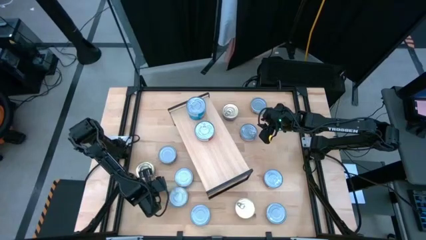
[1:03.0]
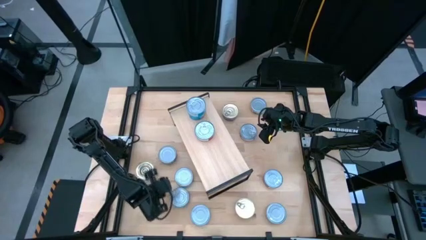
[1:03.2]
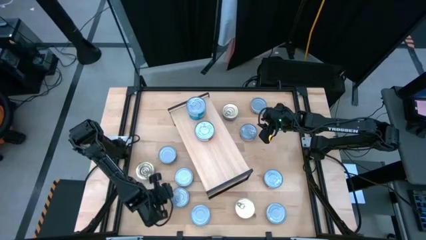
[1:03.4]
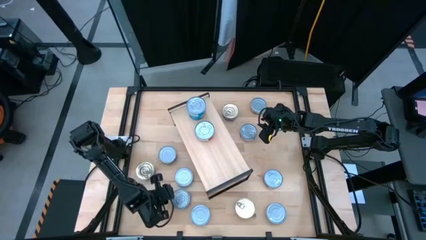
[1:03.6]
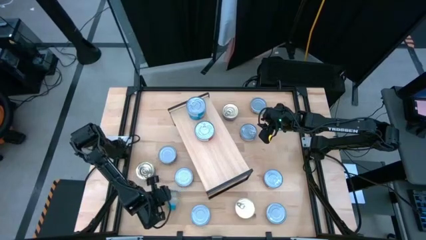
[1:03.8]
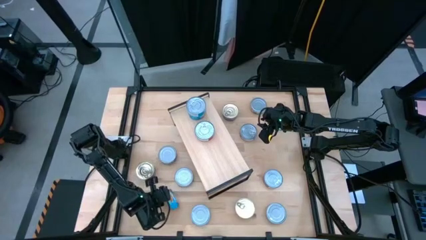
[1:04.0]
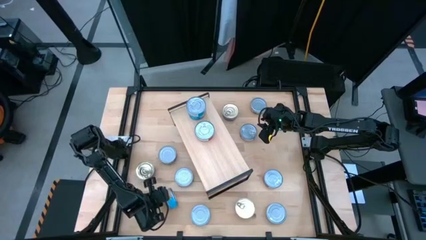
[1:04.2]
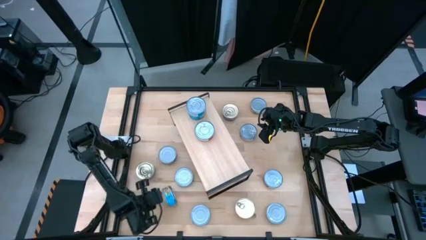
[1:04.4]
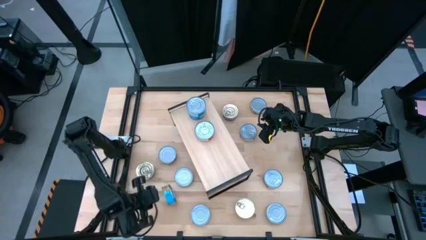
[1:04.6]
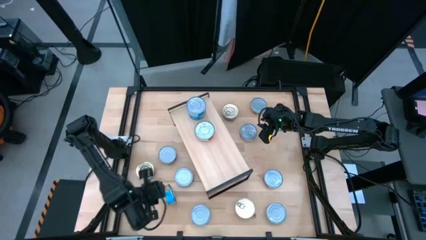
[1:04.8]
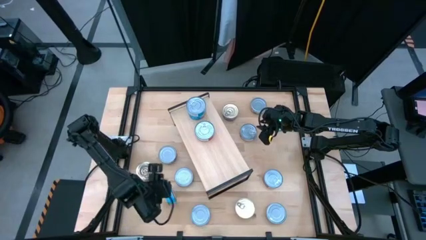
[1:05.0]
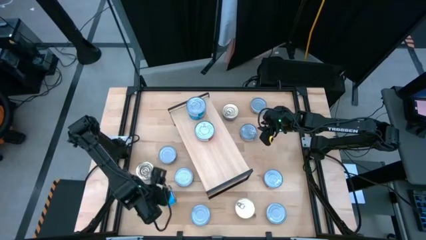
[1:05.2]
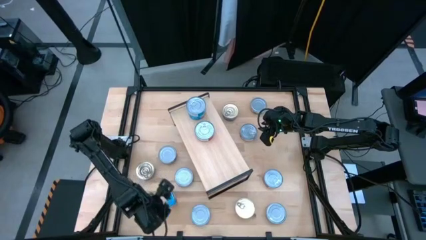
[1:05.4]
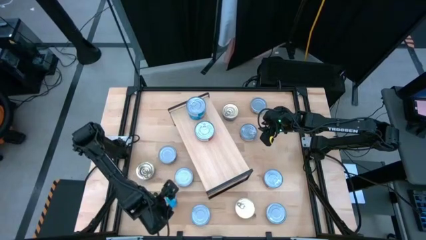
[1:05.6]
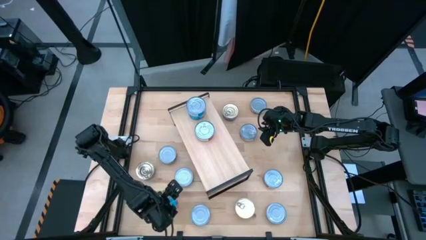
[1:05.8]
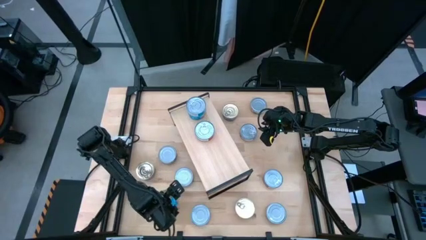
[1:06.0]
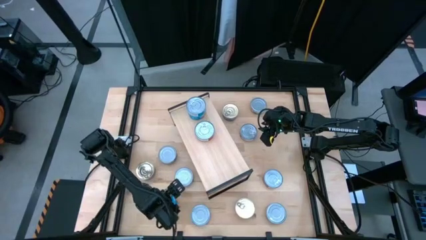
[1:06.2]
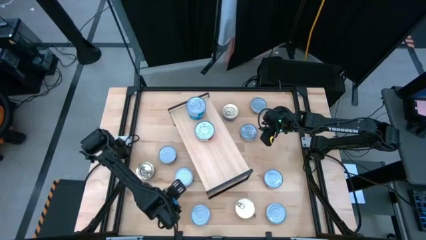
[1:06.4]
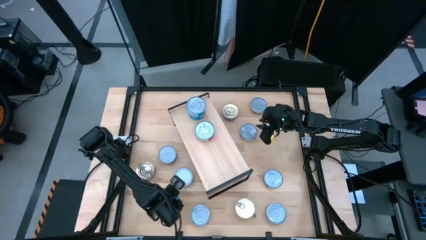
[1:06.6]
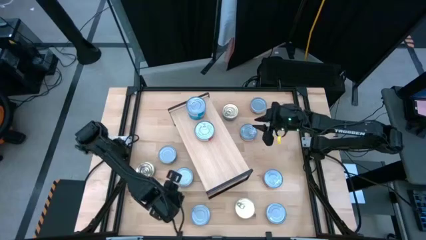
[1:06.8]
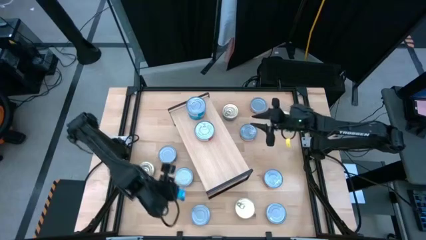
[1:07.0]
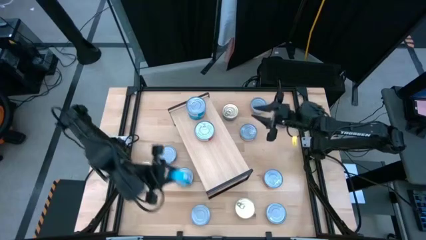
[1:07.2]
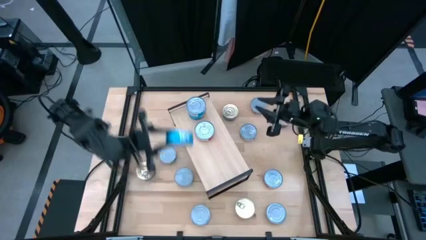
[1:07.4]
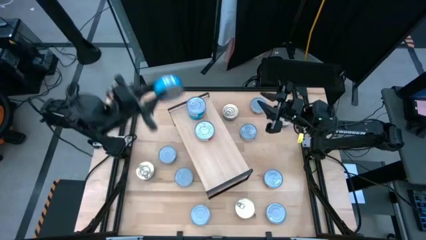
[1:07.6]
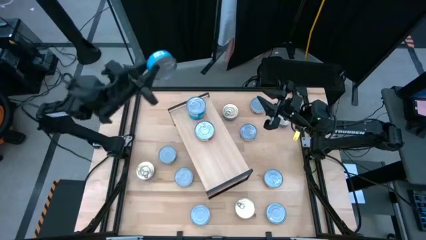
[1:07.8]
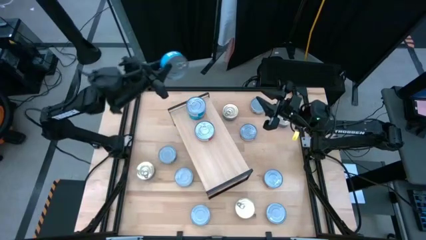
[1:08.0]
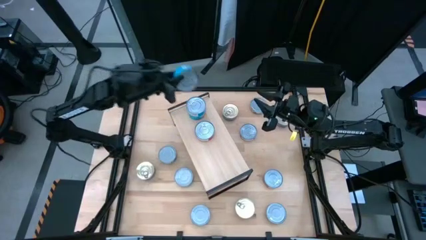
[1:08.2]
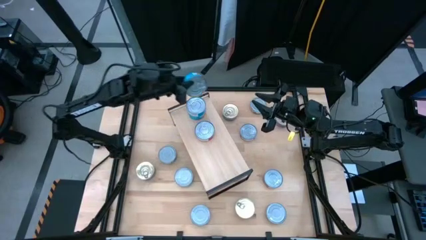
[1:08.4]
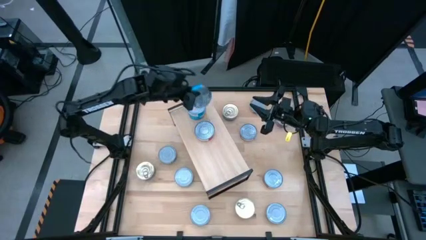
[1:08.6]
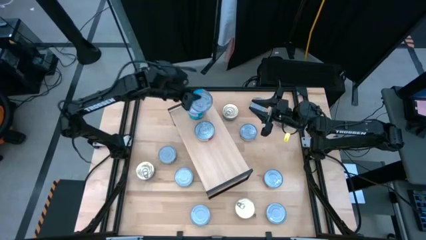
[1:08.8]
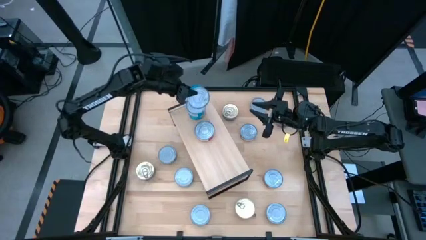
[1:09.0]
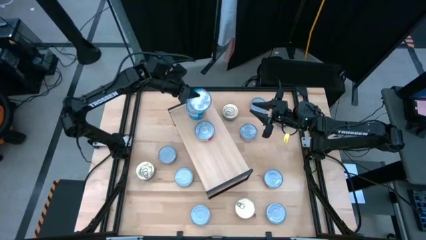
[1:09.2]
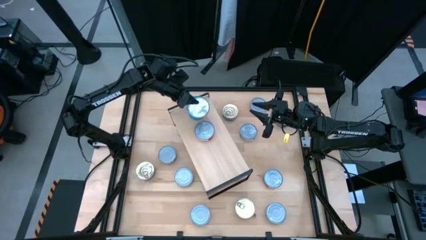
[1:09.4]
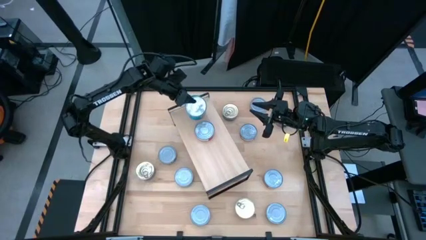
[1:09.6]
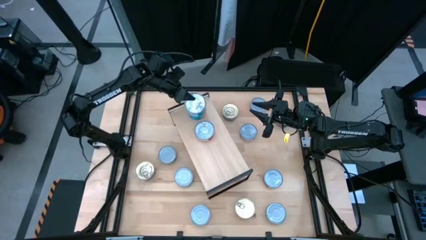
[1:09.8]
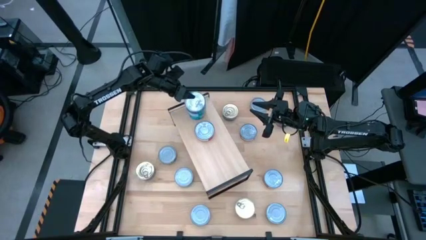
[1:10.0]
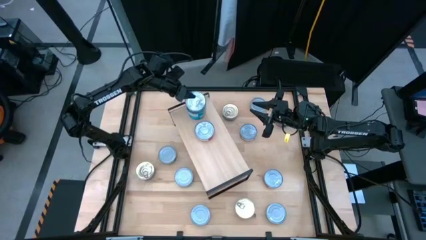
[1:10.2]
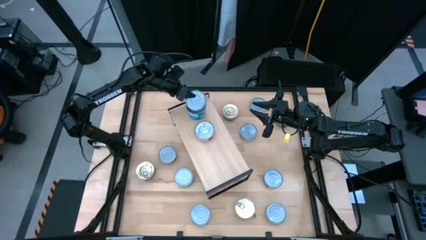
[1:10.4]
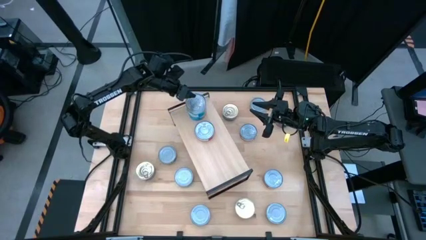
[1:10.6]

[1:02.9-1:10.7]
Task: Stack canned seafood by type on shelf
Stack the yellow-blue tuna can on top of the yellow-blue tuna cans on the shelf

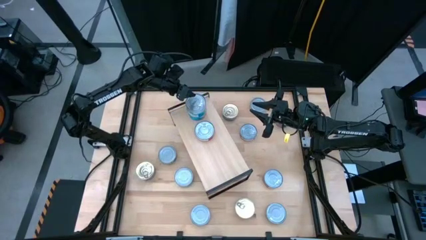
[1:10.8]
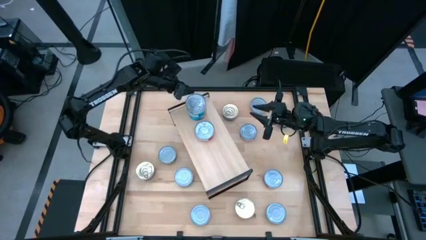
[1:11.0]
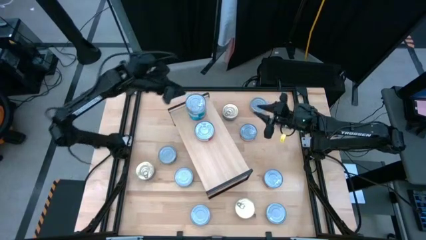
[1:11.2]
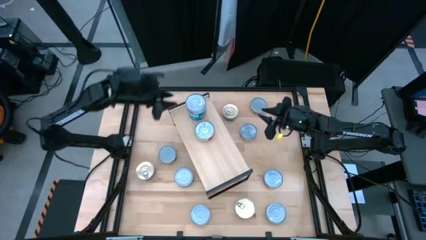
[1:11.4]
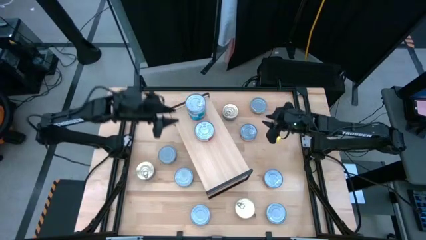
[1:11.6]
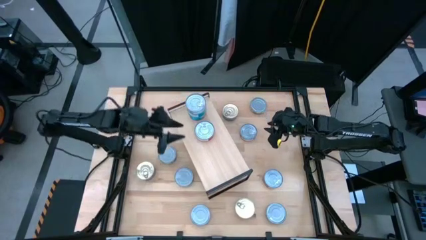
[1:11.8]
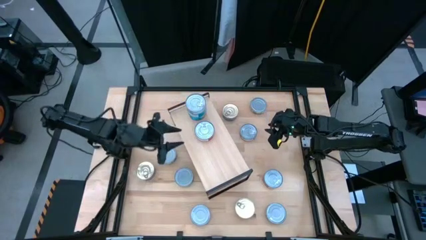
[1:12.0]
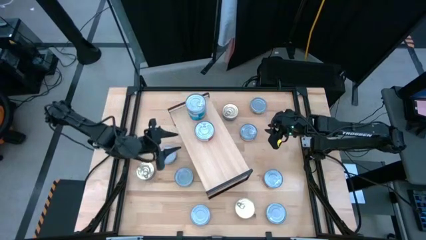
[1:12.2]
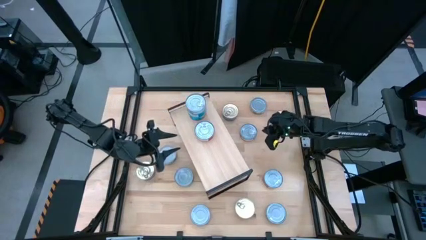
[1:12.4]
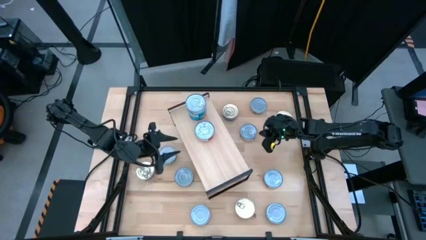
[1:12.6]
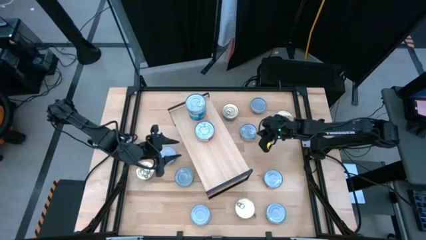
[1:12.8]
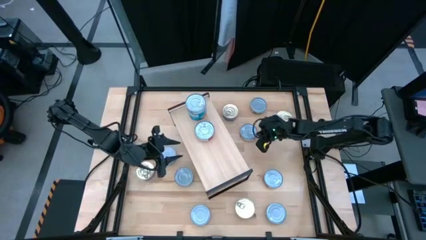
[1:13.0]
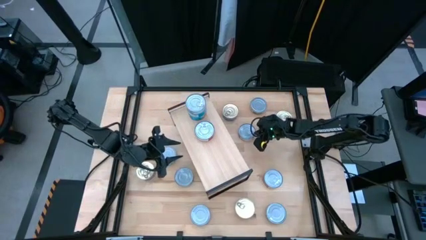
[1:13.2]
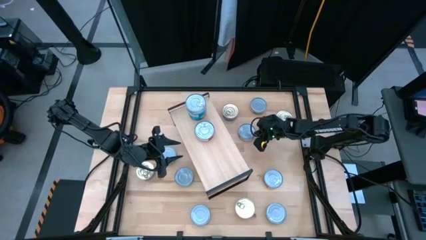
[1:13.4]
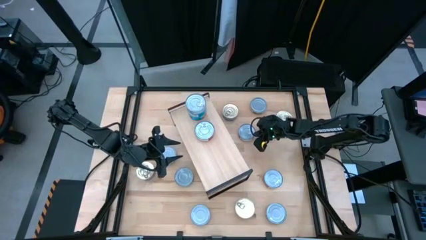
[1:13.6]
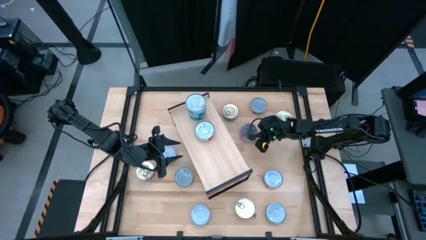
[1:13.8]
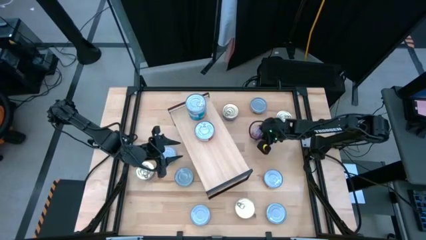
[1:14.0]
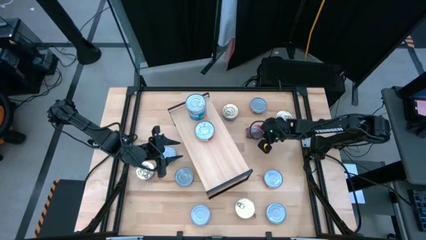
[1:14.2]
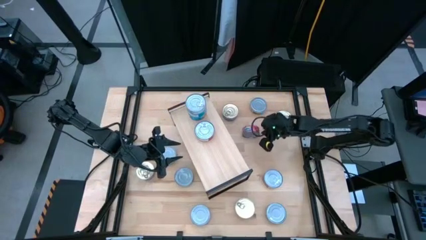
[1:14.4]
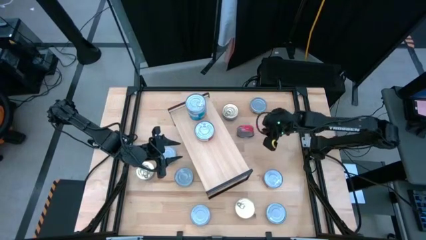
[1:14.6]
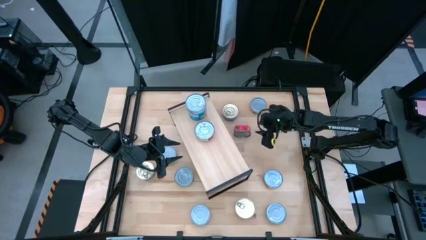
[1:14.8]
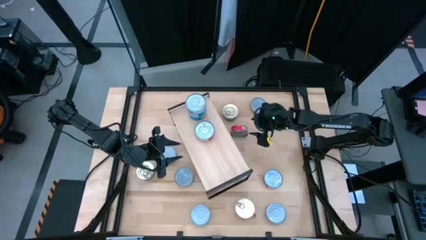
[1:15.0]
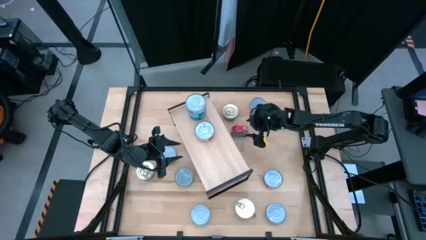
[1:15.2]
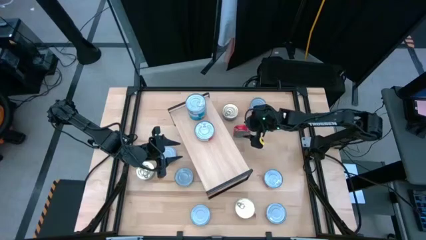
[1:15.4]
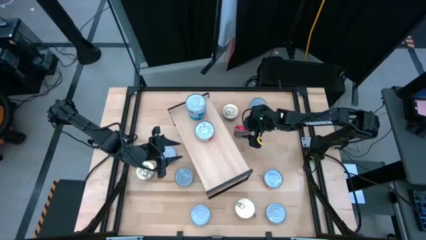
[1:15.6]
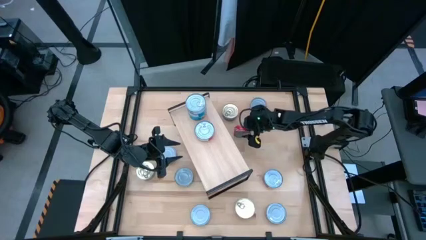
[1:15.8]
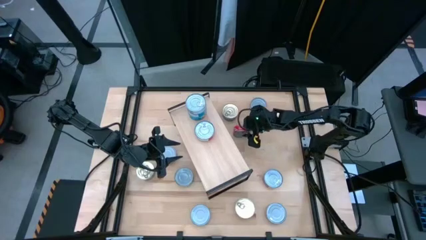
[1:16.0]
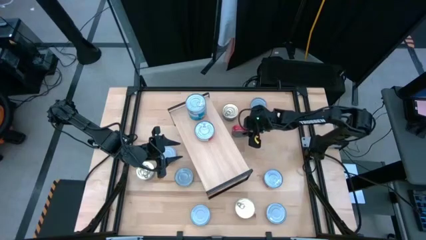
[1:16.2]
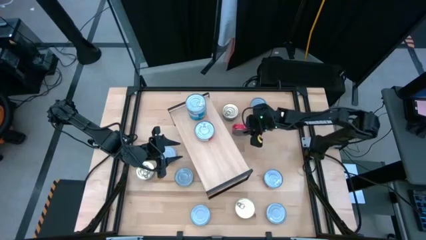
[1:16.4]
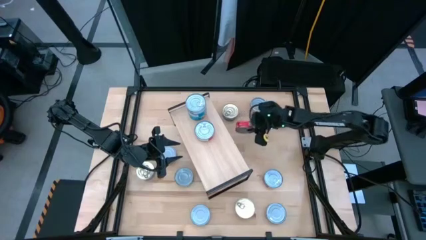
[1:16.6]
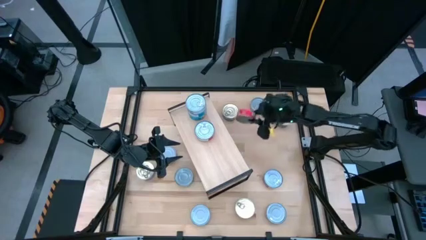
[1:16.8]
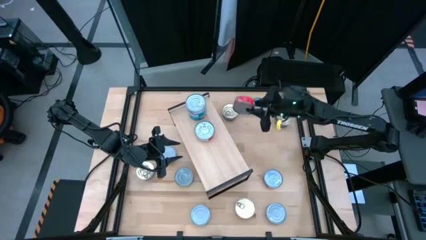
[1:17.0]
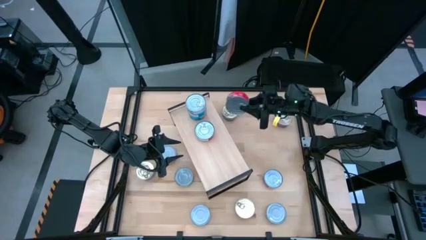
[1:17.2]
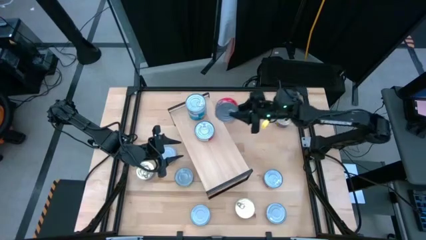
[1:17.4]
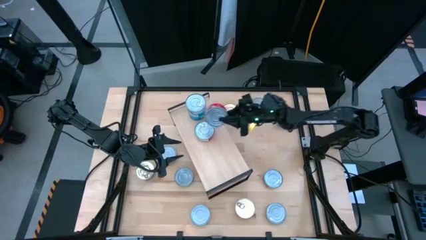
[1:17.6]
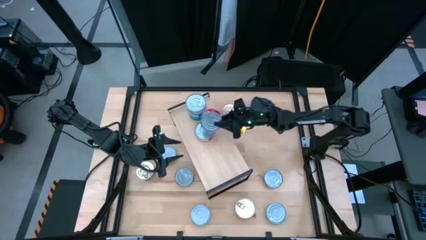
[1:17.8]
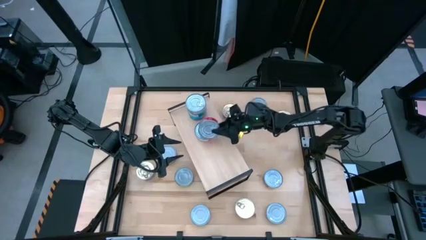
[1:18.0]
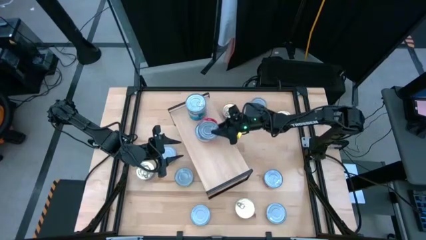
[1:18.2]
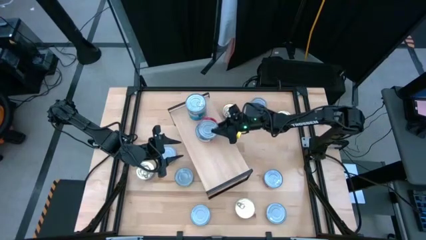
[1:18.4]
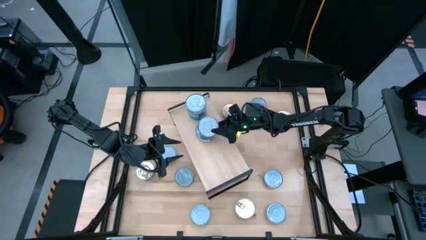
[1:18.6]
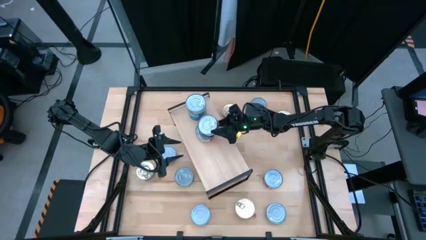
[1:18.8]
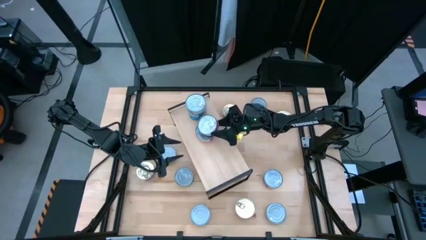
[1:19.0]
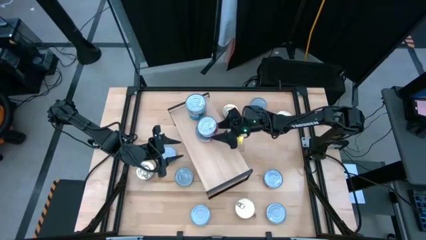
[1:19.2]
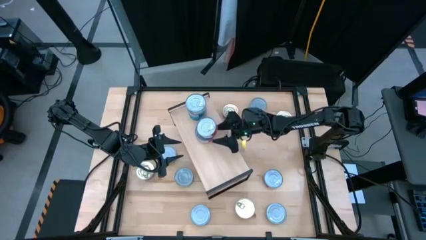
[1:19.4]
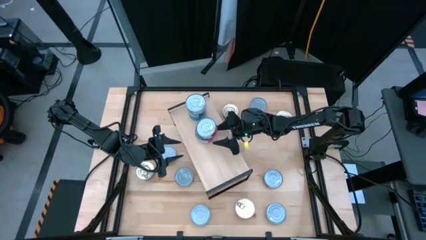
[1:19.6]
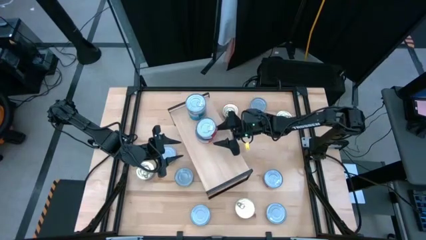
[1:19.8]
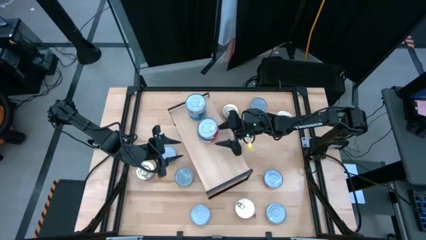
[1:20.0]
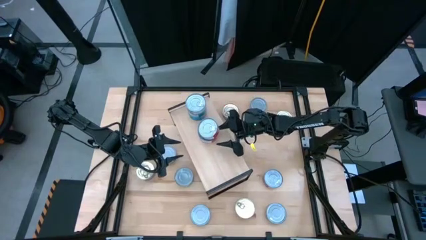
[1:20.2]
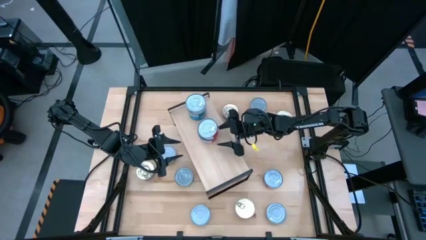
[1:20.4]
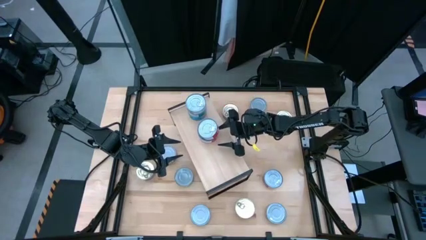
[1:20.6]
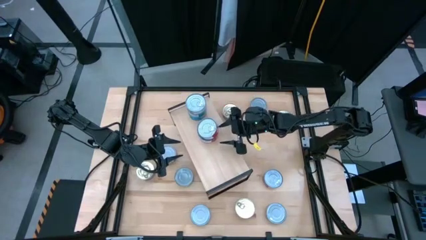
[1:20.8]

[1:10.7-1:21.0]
Stack the red tuna can on top of the red tuna can on the shelf
